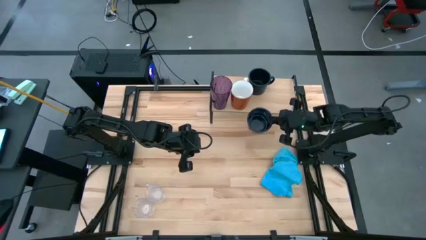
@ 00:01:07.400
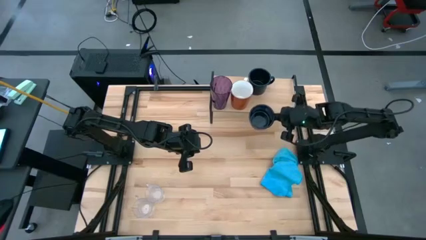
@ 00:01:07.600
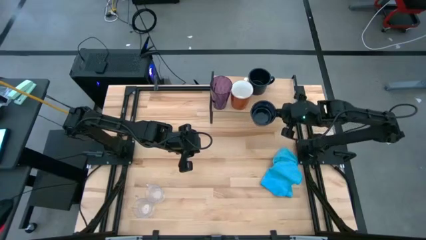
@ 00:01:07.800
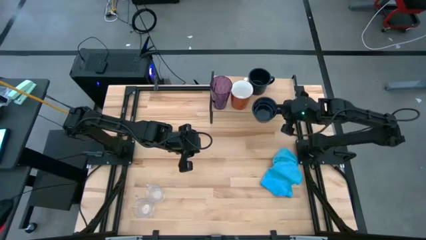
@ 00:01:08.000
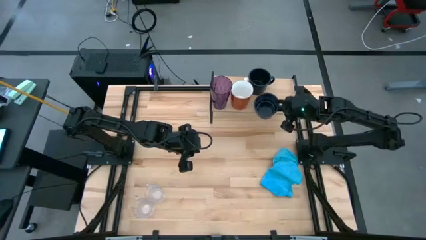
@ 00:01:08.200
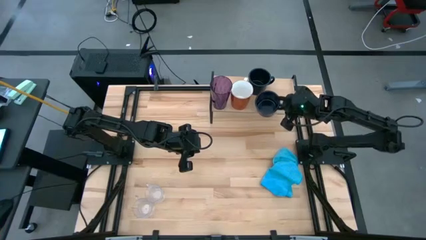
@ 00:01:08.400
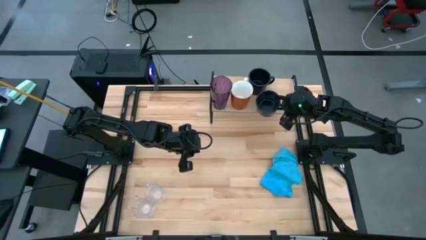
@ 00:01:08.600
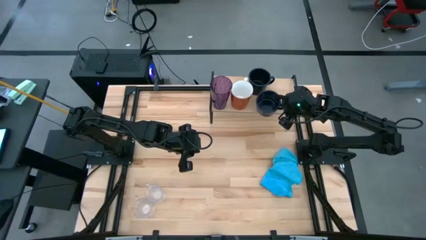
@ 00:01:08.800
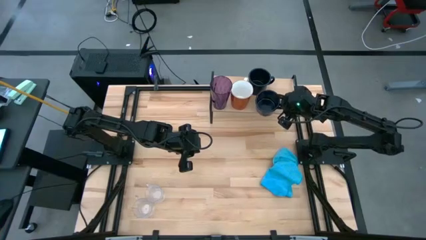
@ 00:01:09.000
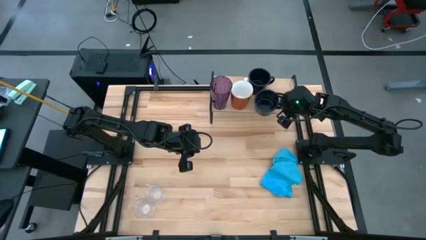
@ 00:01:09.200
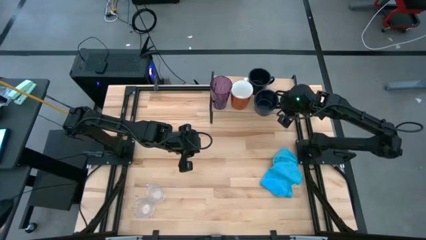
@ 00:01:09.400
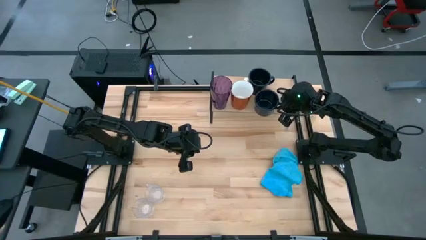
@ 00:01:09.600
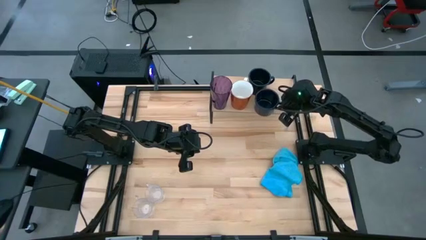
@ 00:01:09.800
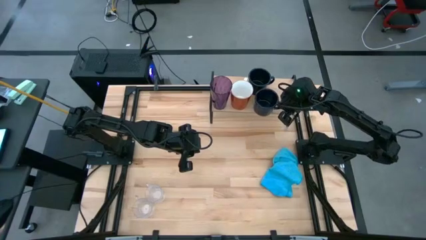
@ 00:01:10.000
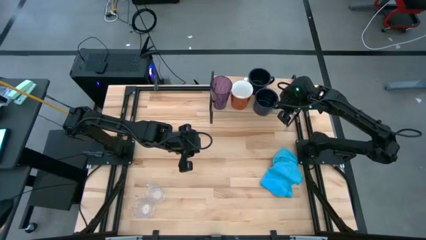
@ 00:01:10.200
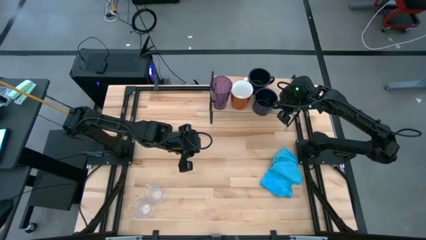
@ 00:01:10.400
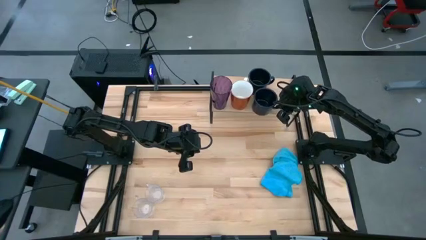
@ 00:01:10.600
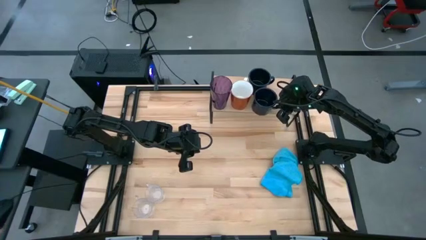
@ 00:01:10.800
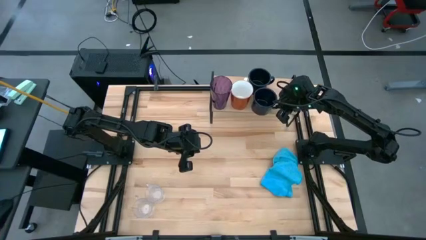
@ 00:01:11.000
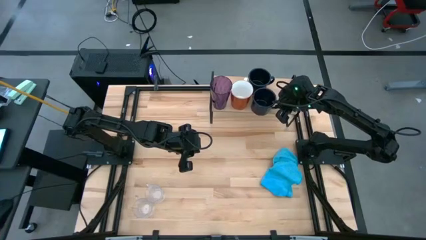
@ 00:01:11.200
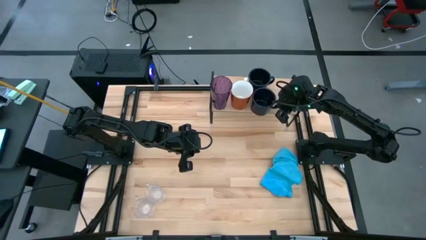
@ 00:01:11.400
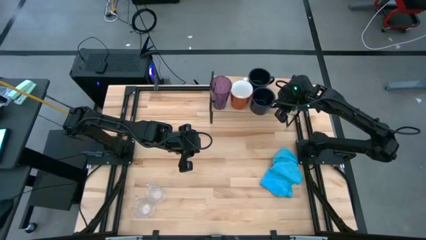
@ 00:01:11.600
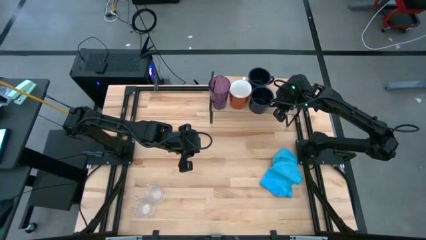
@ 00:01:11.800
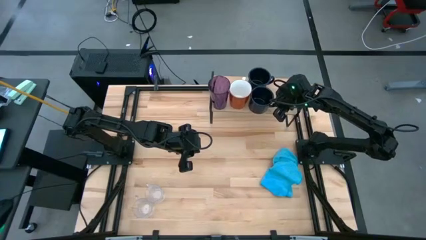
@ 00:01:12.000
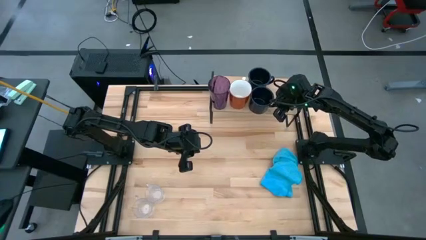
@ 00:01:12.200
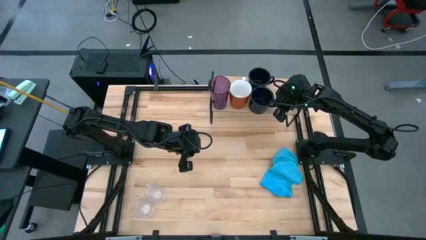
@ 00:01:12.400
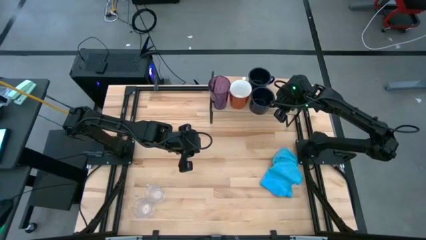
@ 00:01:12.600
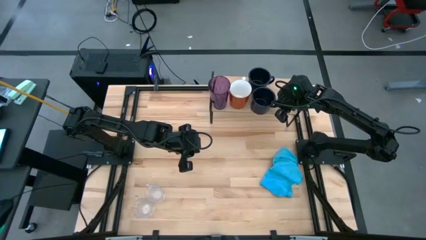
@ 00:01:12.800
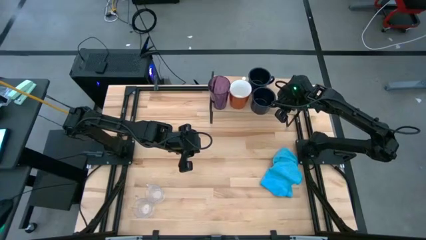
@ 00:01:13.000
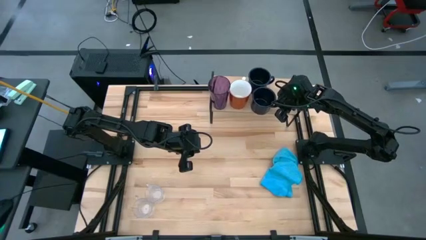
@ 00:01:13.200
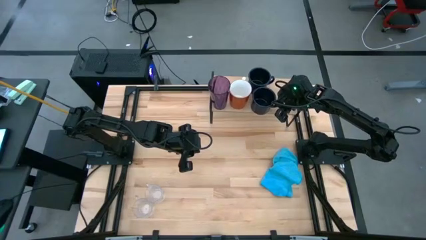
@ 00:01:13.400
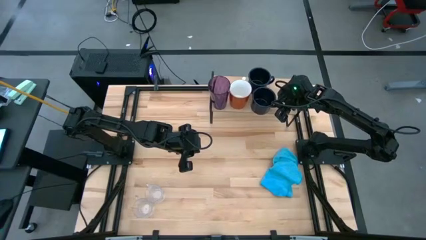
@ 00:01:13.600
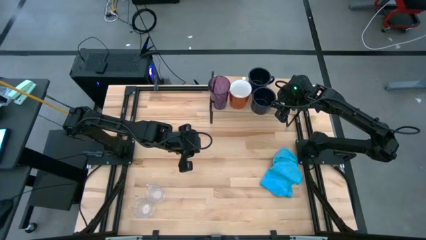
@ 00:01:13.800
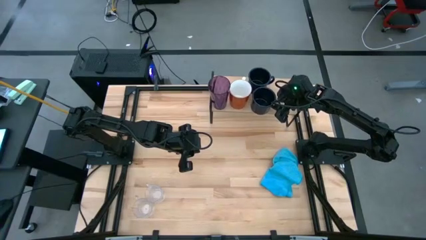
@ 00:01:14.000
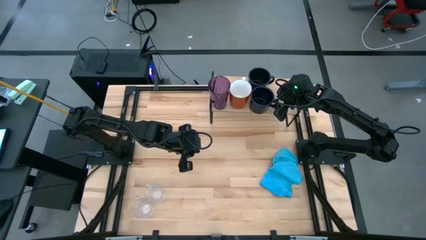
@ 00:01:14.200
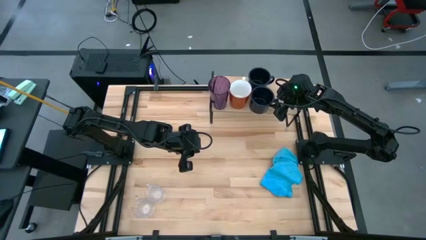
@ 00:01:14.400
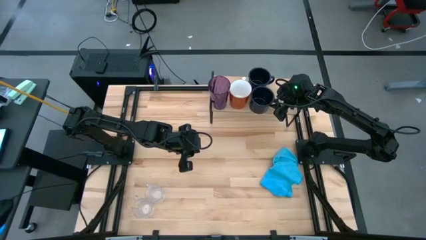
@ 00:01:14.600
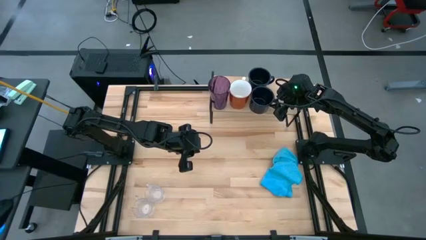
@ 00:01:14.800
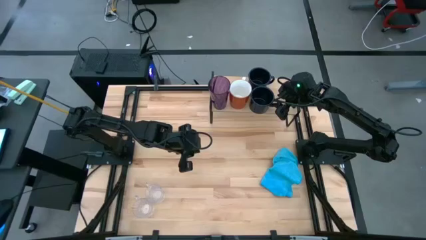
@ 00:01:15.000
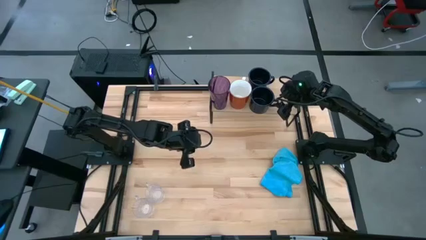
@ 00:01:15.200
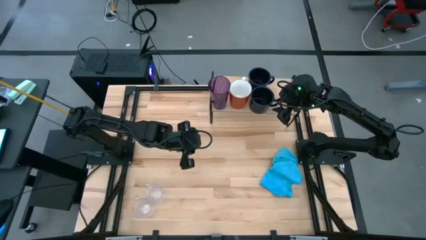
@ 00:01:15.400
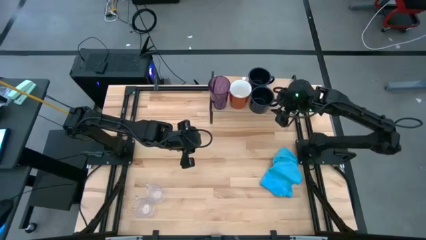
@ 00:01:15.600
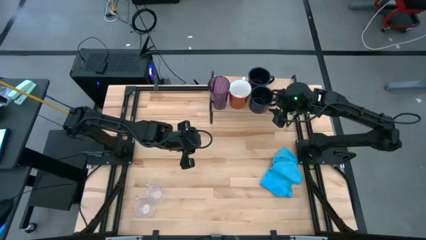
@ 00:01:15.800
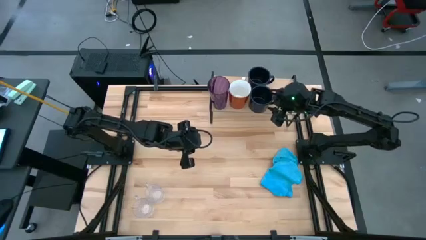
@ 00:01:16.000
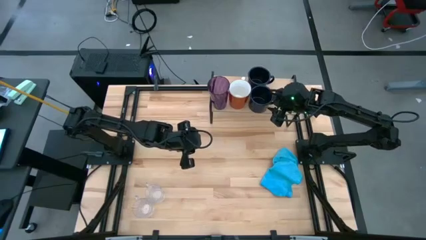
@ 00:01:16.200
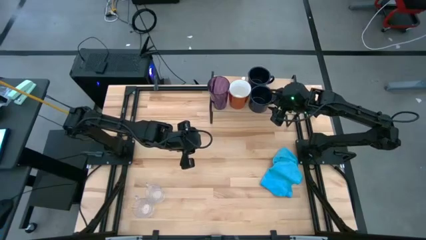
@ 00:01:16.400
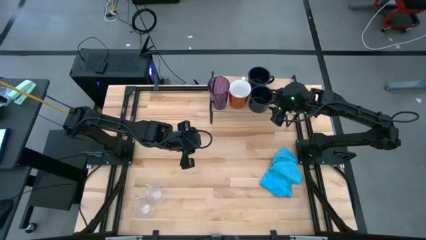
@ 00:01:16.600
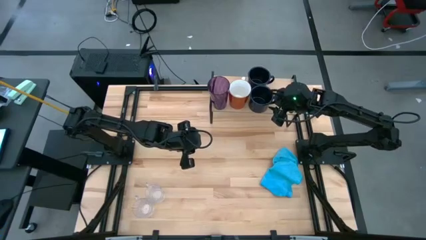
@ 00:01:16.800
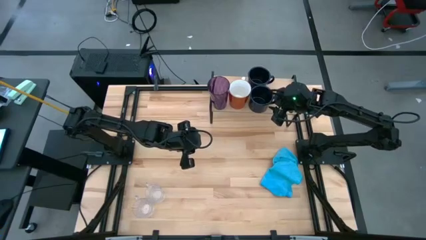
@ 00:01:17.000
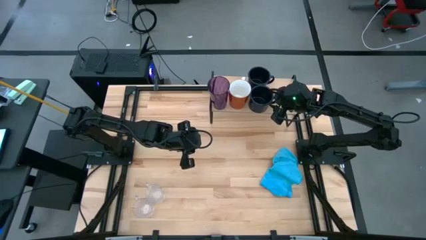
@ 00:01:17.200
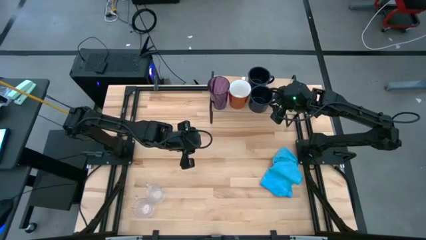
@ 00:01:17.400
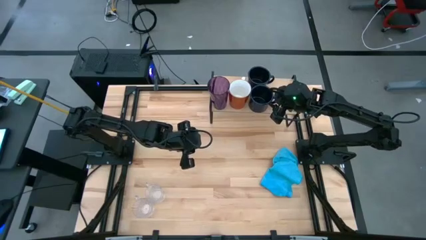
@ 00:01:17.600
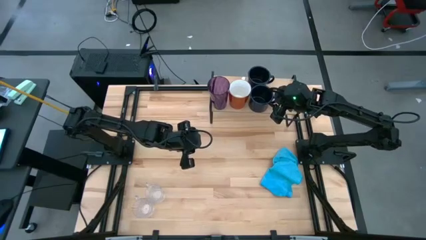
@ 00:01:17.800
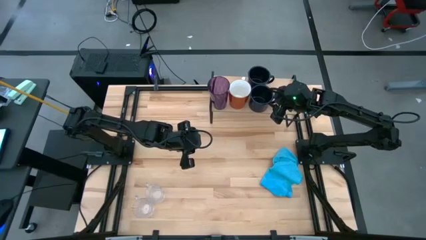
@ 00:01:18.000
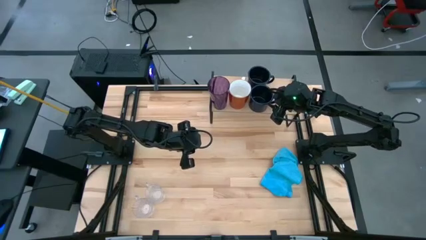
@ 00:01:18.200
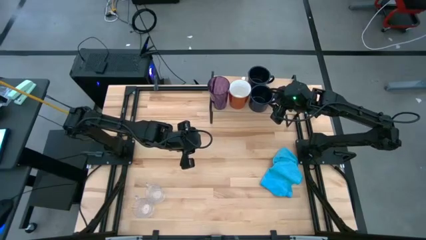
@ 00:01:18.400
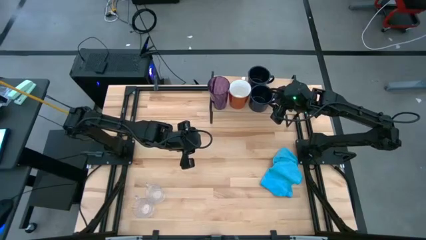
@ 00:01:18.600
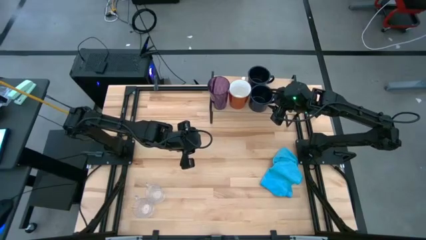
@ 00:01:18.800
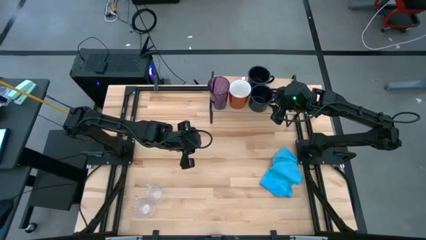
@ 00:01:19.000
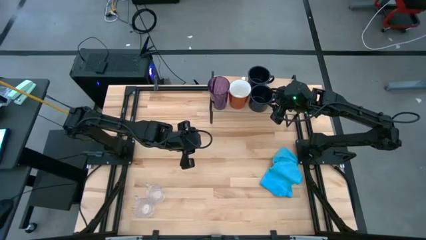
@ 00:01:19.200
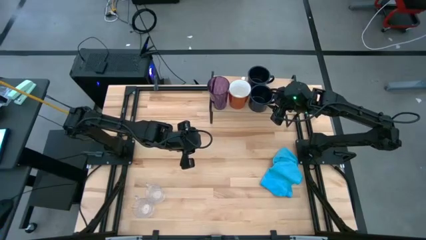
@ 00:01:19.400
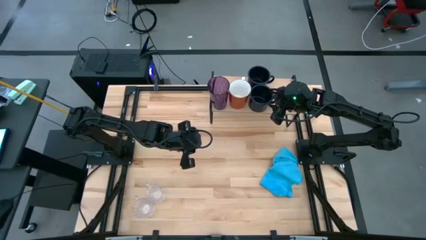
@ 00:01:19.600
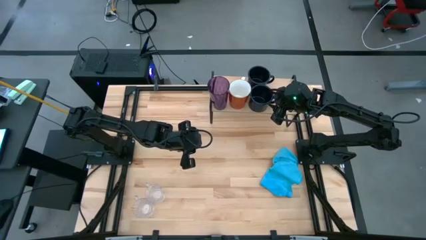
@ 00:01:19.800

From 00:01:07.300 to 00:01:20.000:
Task: Stack small to large cups/mugs on shelf
Put the black mug on the shelf

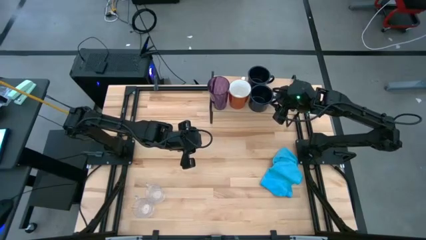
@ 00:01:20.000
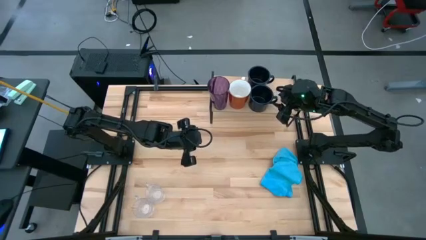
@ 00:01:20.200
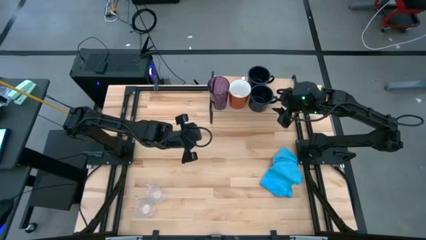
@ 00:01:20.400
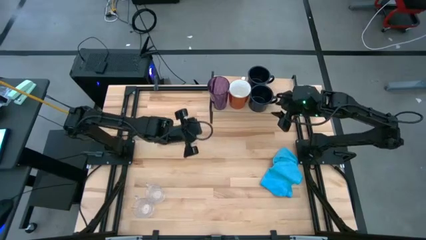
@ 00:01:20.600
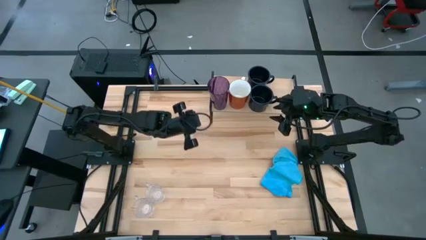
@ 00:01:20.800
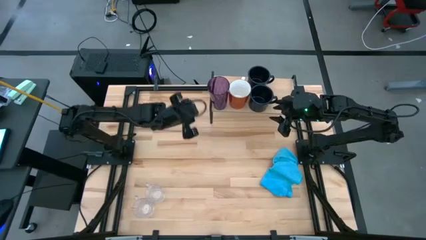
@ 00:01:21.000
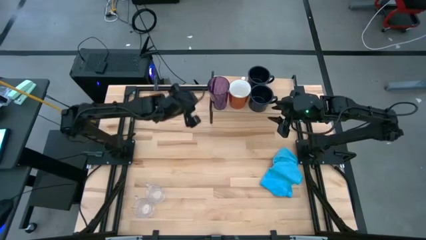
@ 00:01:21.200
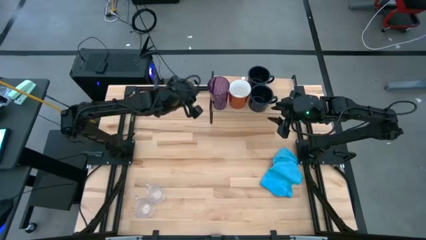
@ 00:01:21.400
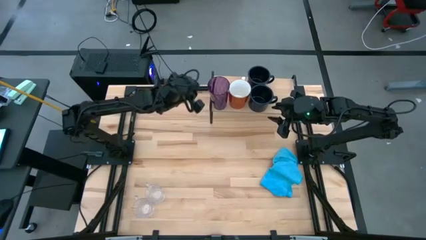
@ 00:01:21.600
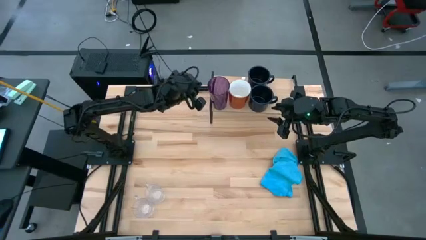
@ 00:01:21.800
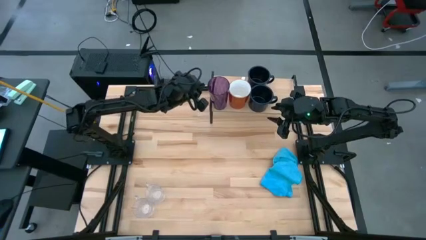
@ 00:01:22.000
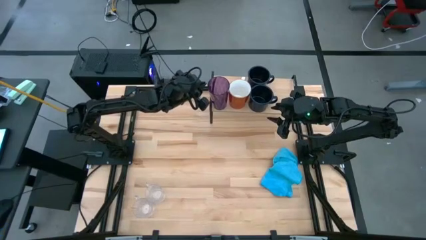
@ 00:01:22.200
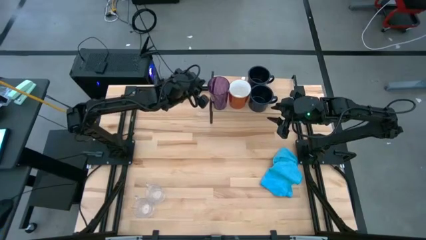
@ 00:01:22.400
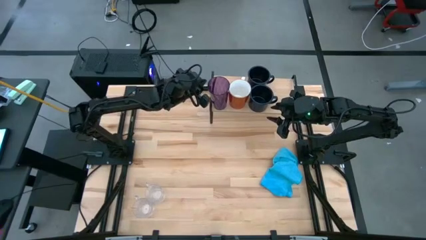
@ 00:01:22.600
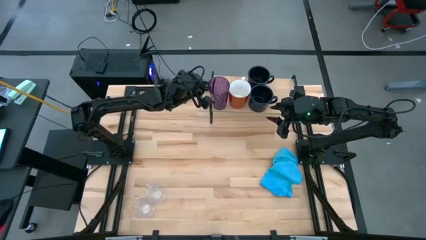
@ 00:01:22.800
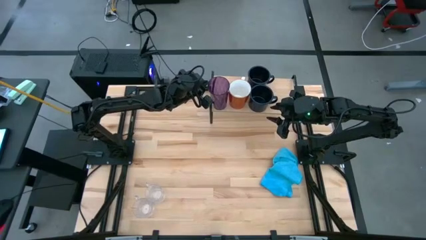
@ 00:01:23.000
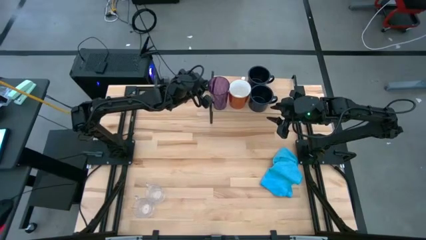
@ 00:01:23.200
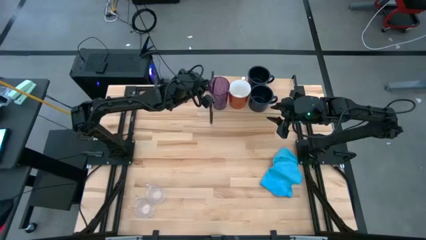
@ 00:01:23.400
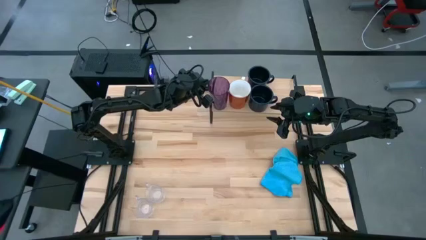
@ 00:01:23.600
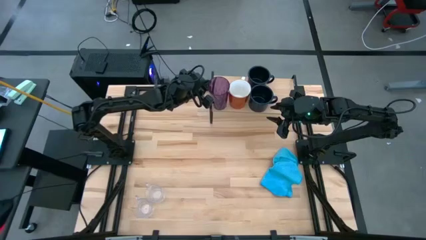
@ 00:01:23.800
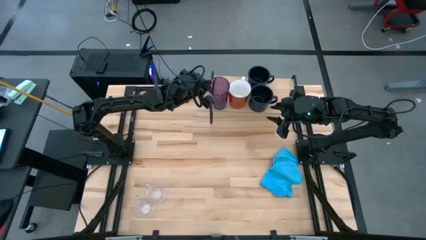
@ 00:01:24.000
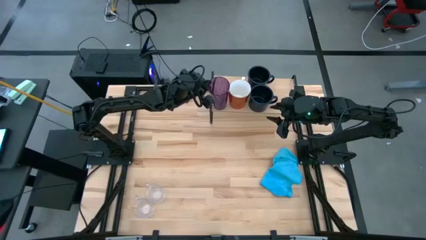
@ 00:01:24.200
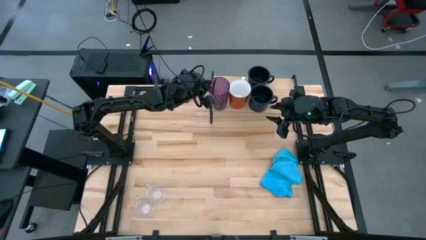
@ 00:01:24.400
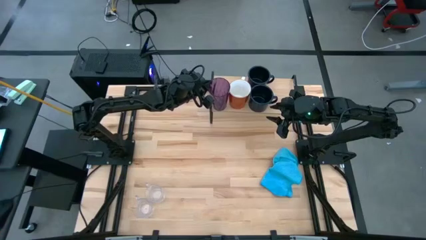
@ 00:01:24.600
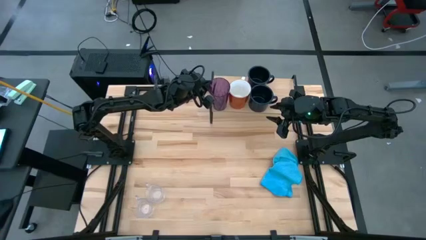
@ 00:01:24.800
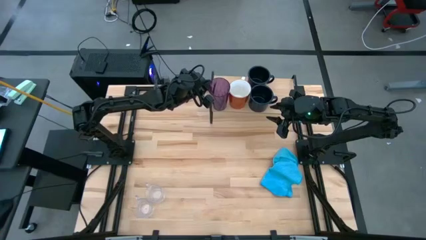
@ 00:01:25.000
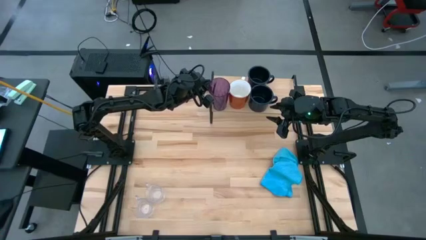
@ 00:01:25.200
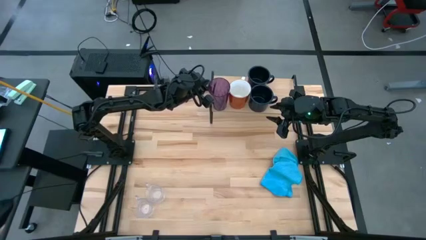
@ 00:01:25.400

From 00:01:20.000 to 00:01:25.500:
Adjust the cup on the shelf
